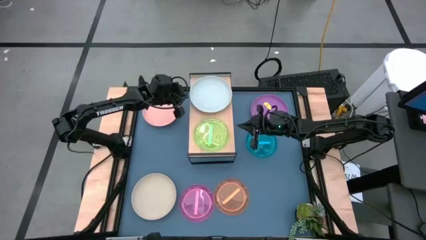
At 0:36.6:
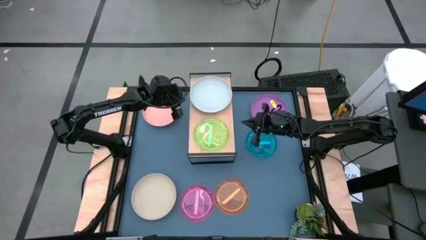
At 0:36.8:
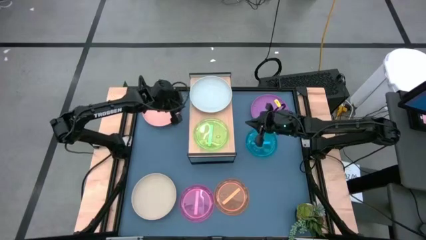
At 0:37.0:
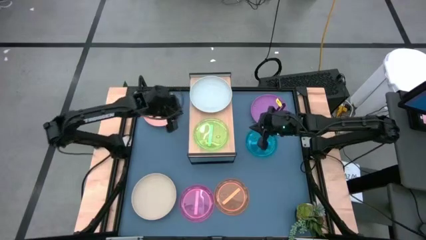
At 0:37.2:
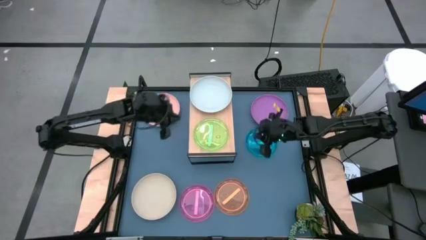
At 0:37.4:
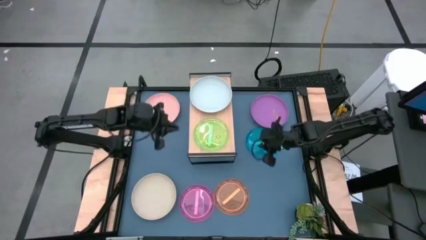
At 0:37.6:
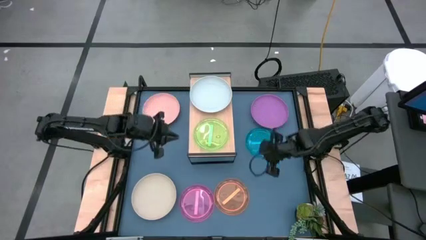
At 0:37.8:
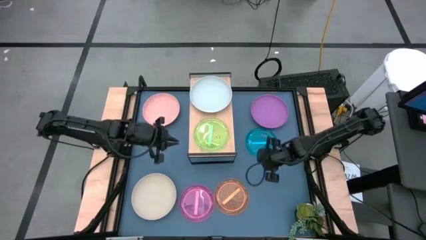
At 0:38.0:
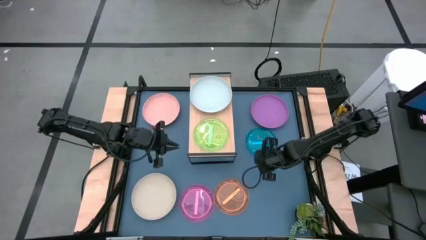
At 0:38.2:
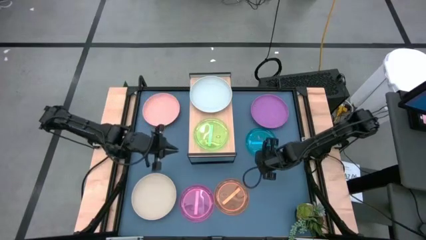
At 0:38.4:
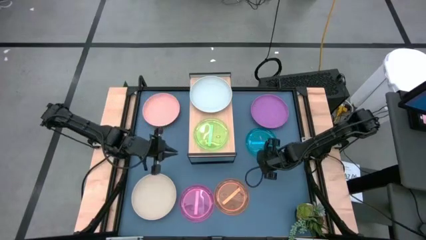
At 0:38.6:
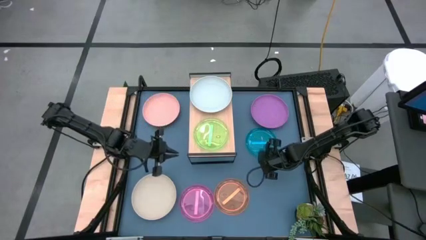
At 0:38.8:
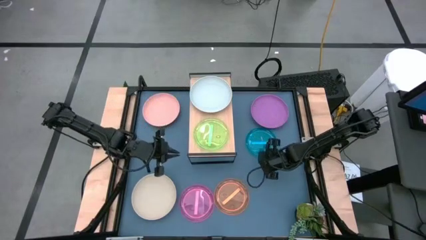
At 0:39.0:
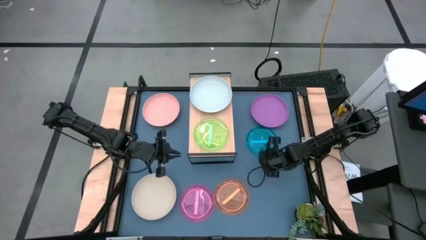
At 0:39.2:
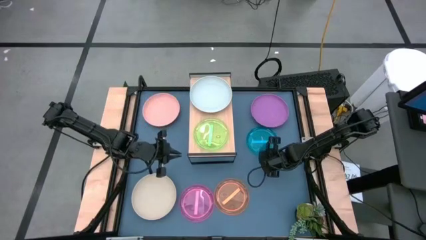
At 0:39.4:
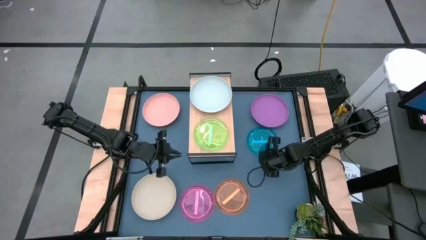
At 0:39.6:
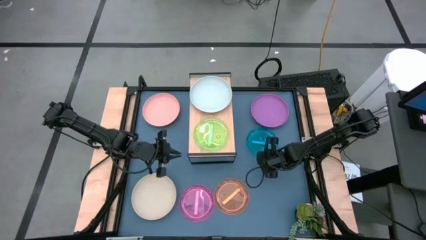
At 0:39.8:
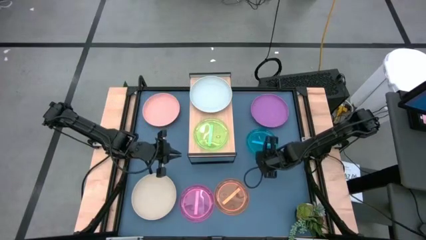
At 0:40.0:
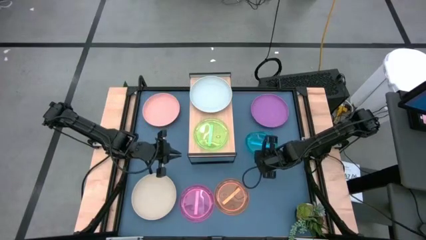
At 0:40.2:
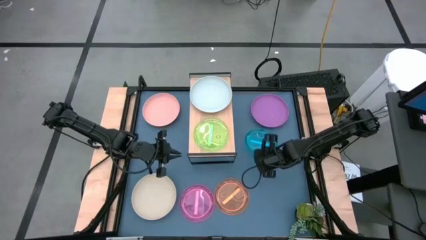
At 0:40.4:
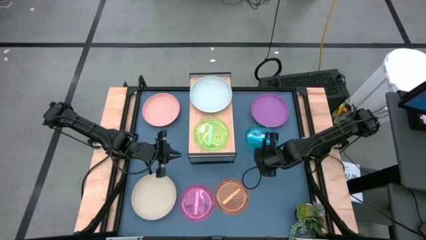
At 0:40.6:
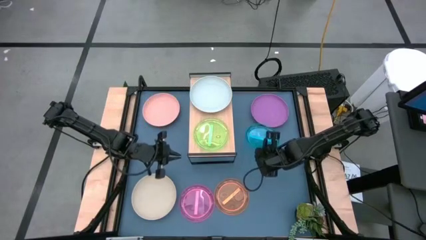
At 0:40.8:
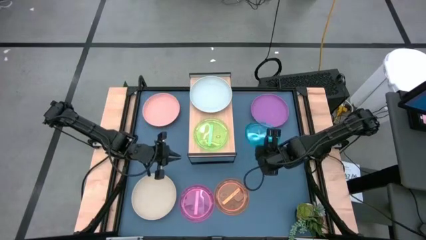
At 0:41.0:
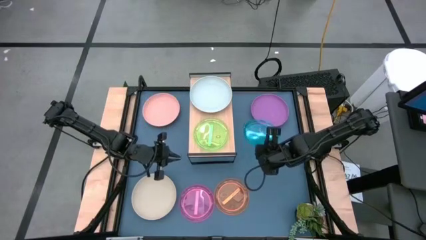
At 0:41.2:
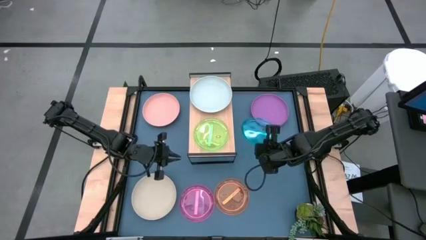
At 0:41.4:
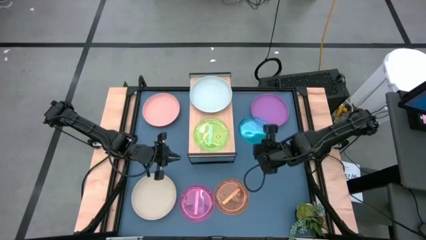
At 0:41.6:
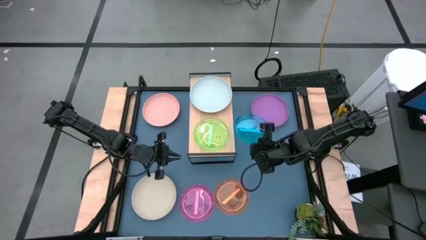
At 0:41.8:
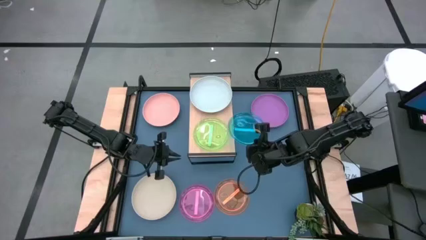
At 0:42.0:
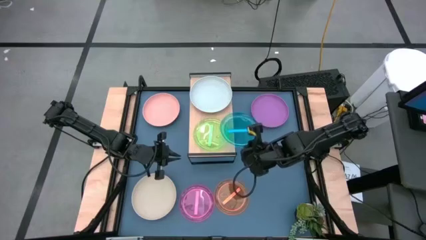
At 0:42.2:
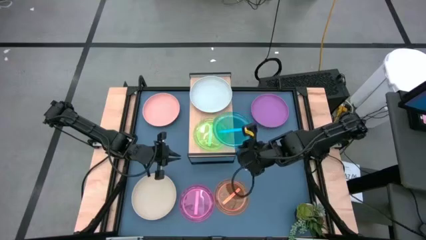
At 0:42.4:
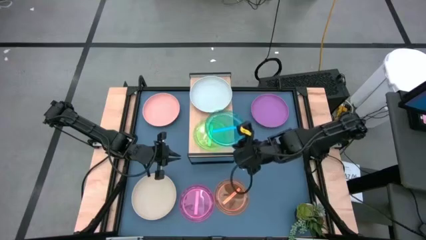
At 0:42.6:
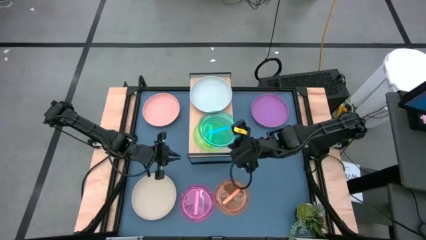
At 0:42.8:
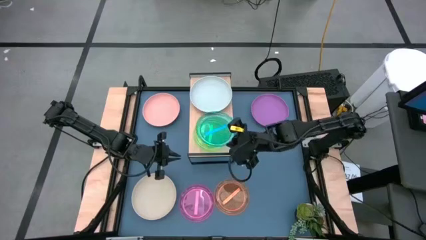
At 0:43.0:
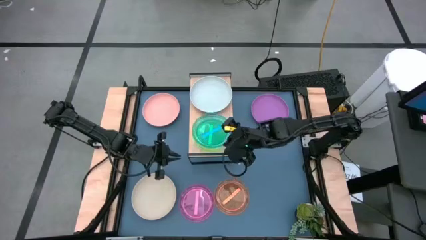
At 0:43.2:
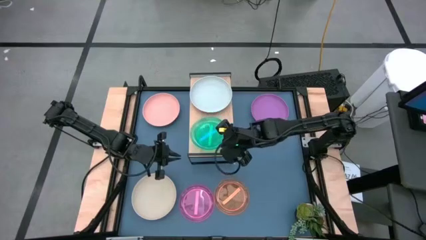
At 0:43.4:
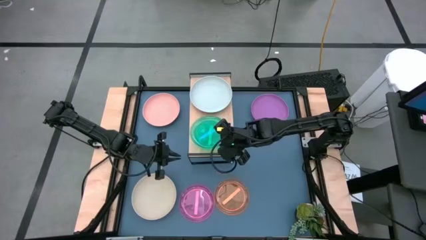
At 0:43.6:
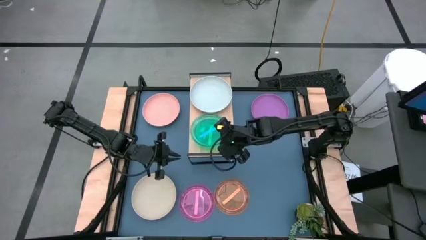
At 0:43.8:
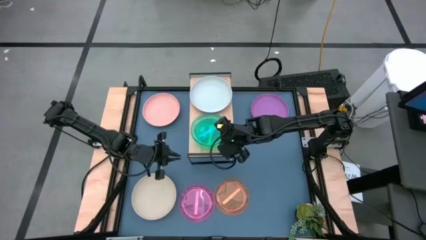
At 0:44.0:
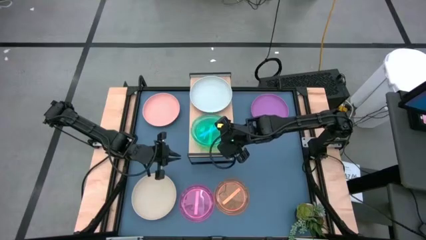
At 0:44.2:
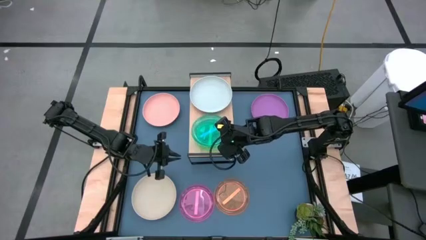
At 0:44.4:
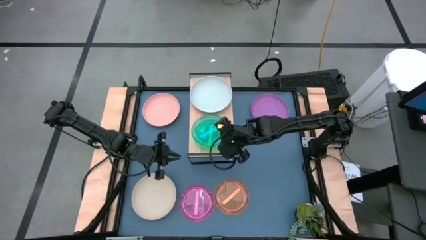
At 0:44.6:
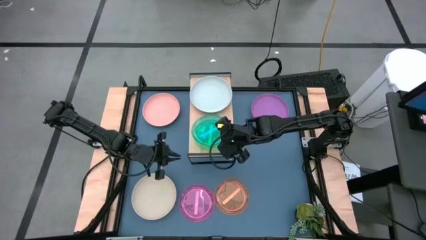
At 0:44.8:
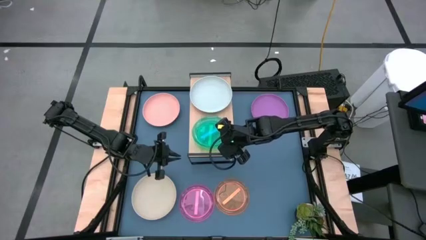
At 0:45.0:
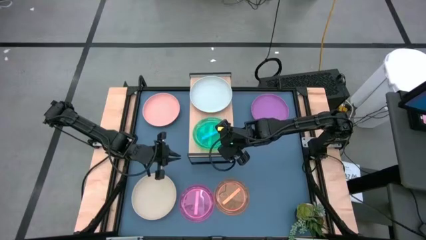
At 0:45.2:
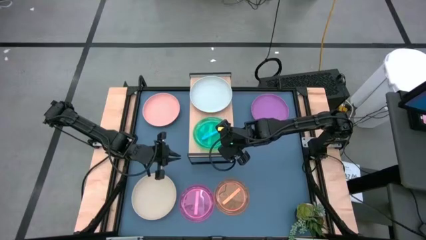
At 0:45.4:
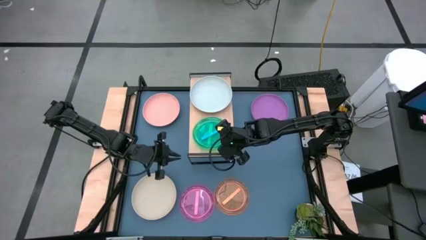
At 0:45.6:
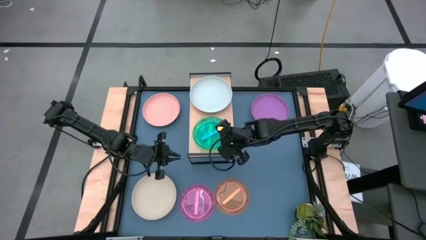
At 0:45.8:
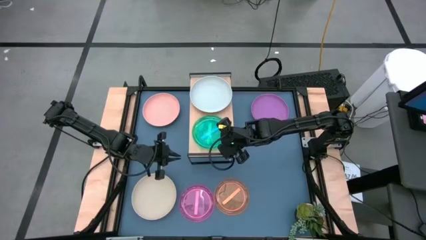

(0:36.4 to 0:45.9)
Task: Place and stack plates onto a shelf
Stack the blue plate on top of the green plate on the shelf

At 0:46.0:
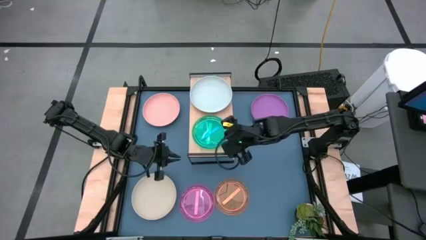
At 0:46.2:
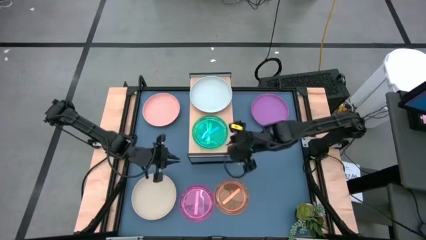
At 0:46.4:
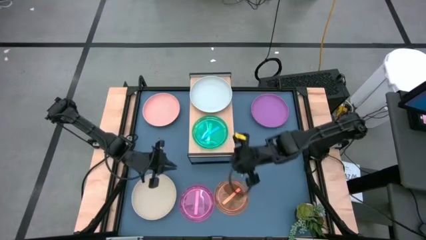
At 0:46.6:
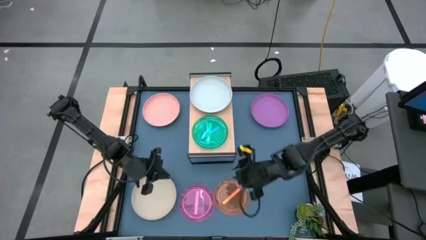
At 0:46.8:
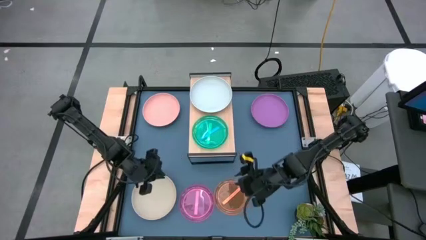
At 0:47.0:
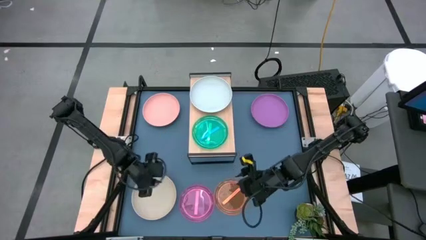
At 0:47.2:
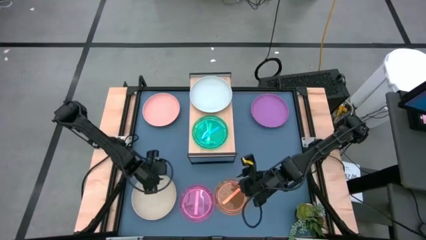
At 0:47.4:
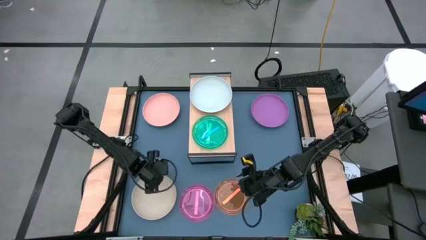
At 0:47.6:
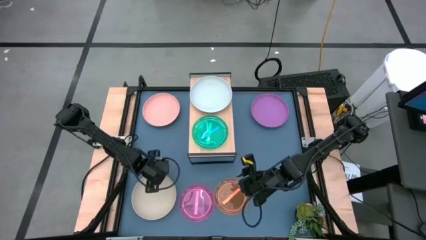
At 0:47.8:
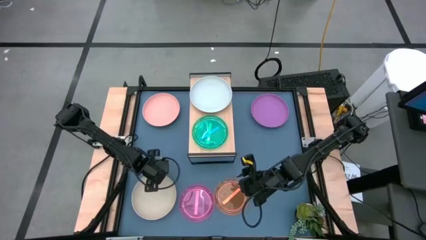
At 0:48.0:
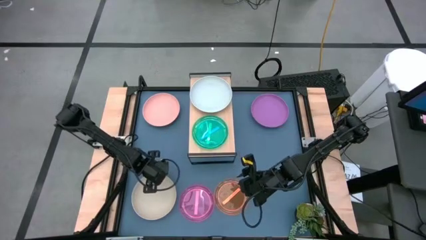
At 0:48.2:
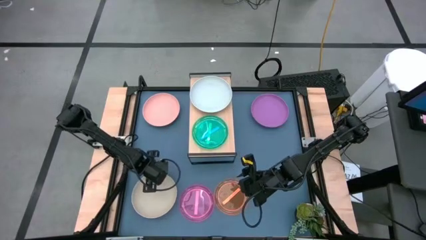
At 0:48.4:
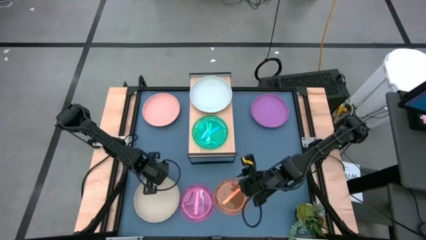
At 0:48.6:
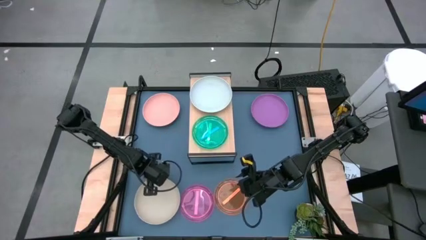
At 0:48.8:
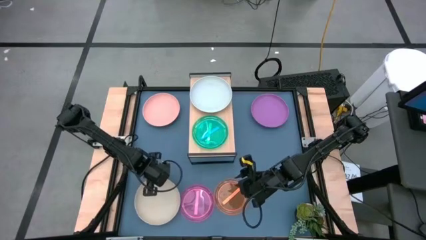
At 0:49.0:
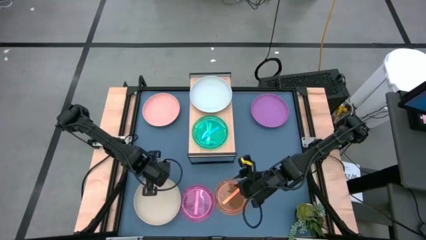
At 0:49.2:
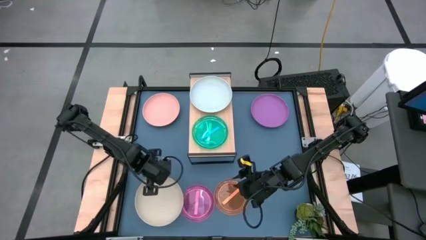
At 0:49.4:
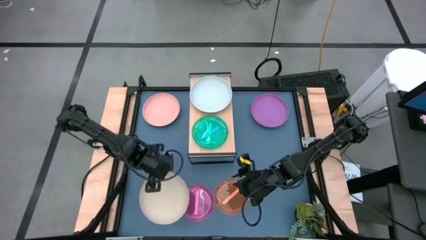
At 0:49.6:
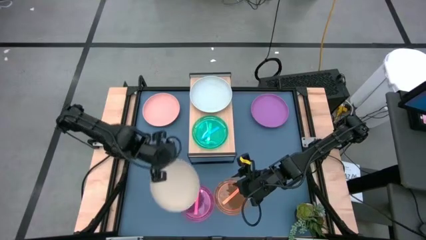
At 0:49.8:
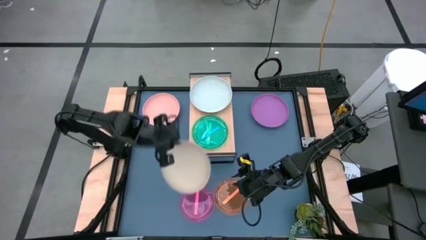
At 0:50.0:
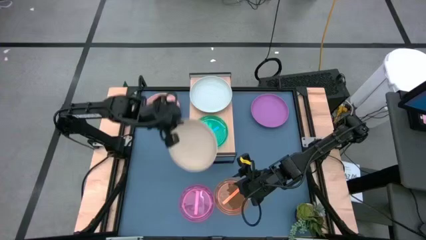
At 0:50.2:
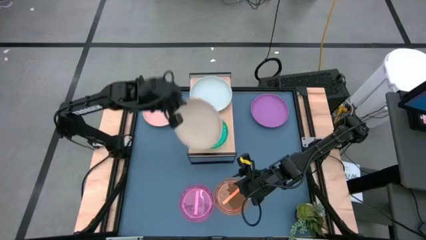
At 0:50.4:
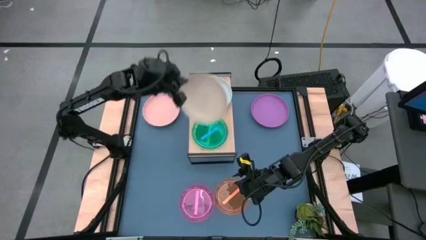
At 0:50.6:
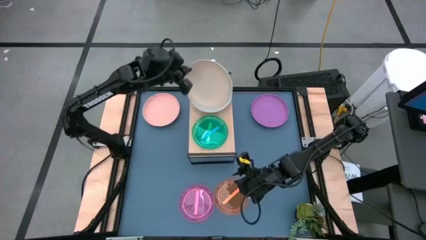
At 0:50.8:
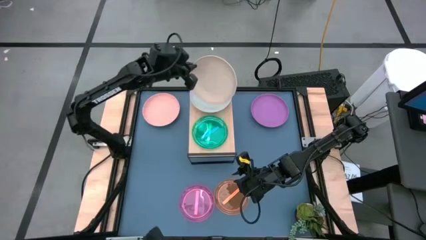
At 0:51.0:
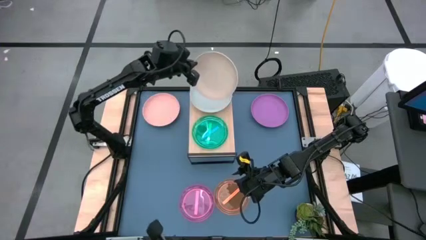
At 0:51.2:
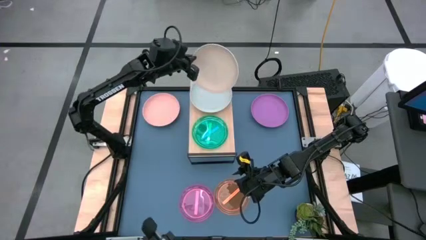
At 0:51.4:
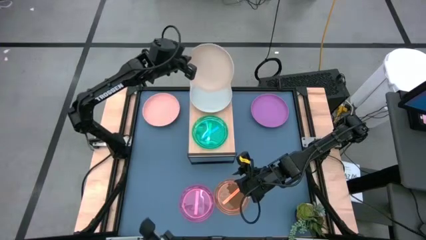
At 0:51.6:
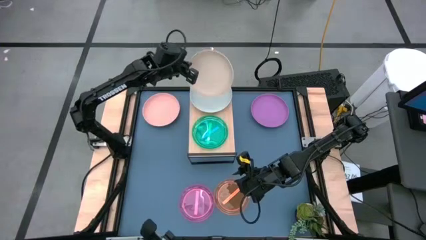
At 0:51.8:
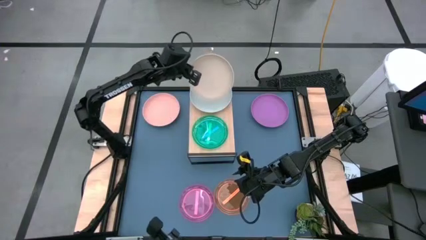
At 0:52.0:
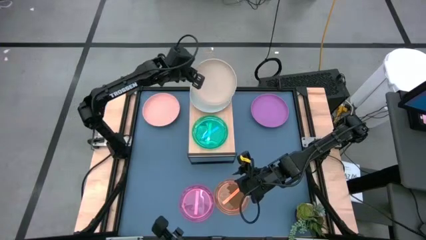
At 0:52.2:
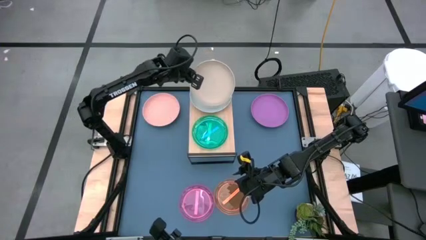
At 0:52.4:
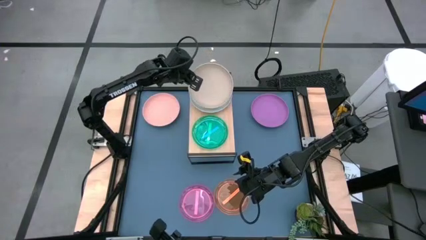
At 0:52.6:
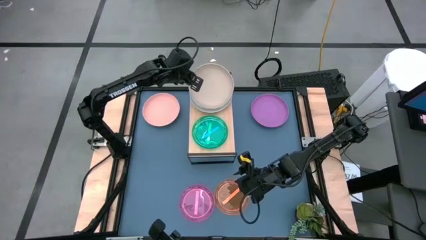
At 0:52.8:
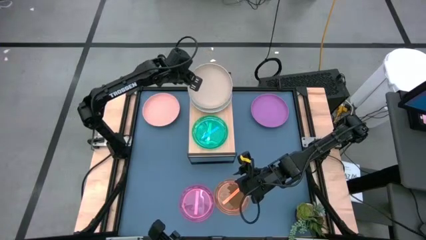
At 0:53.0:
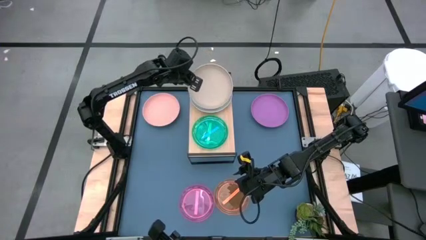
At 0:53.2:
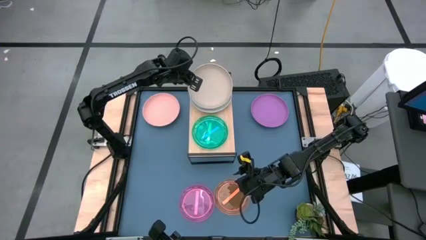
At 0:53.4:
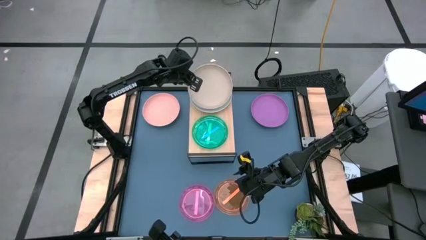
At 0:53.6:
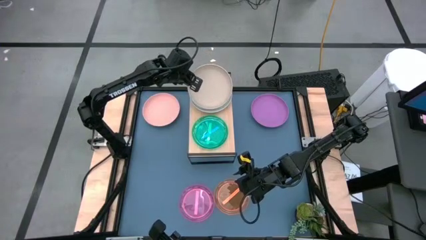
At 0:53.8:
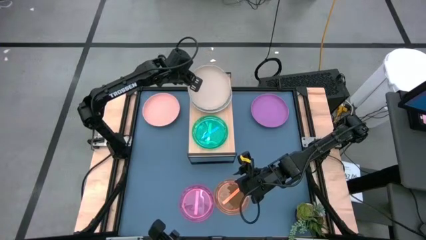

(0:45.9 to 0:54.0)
Stack the brown plate on top of the gray plate on the shelf
